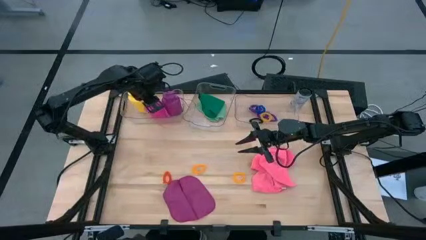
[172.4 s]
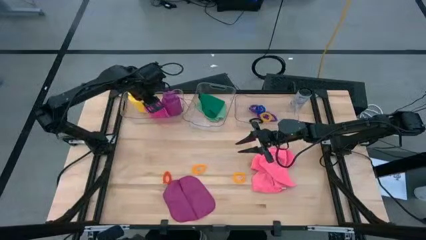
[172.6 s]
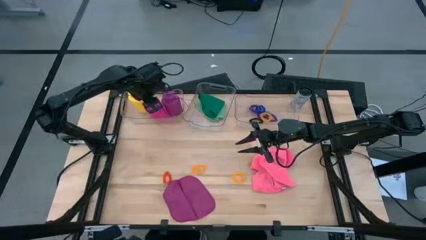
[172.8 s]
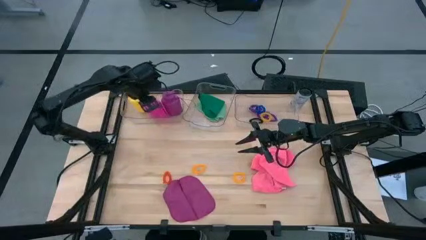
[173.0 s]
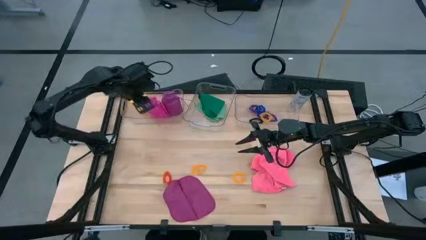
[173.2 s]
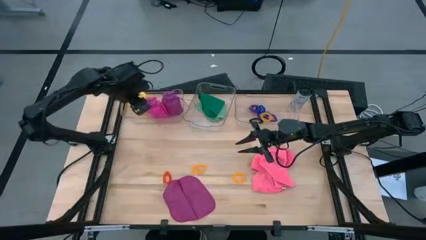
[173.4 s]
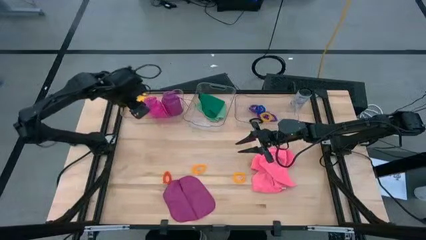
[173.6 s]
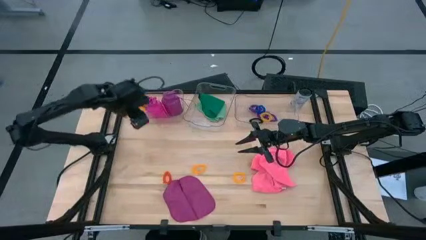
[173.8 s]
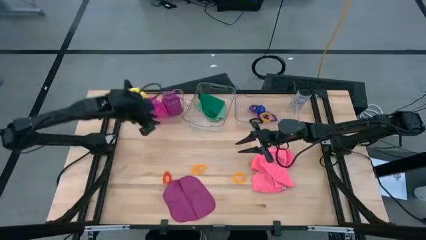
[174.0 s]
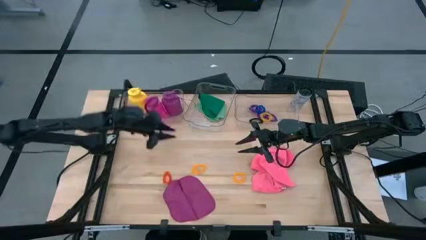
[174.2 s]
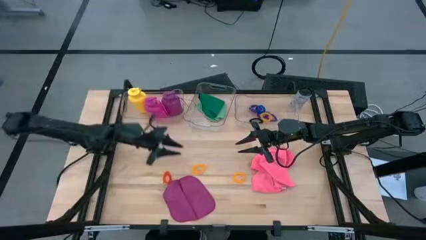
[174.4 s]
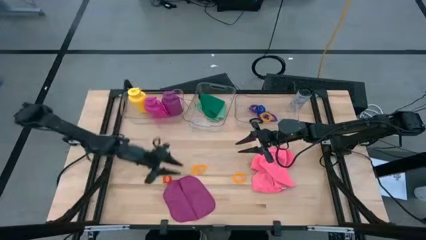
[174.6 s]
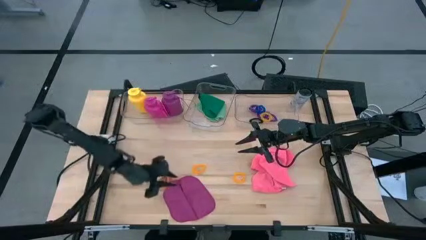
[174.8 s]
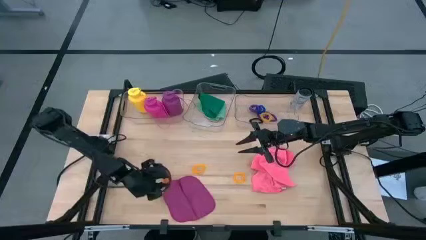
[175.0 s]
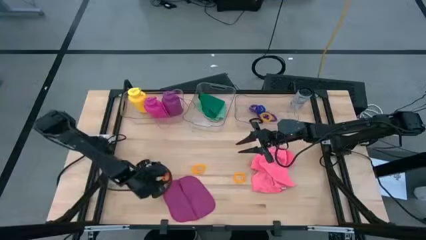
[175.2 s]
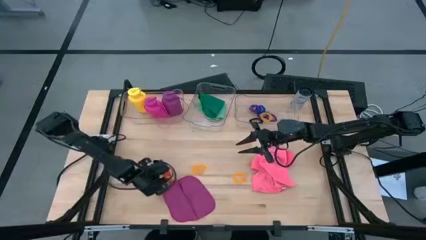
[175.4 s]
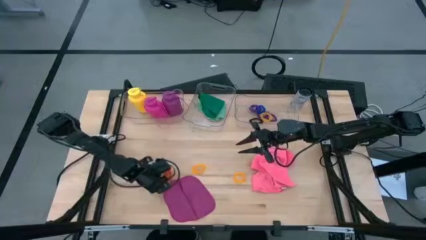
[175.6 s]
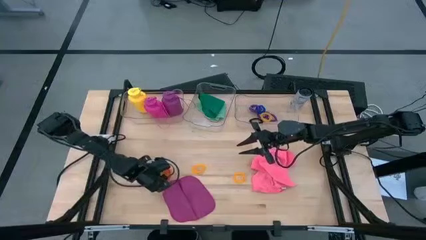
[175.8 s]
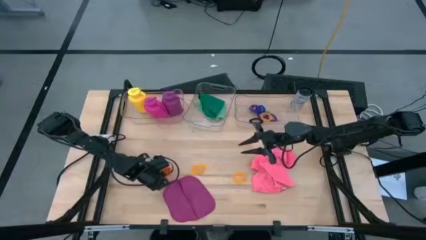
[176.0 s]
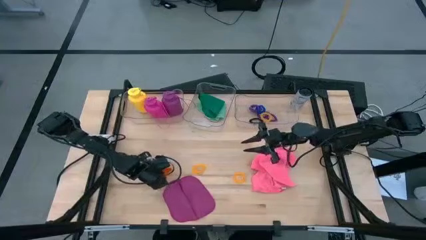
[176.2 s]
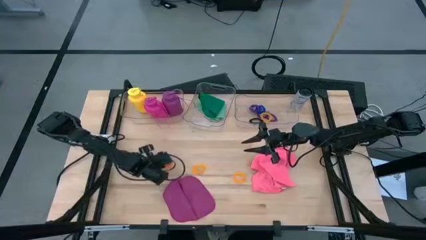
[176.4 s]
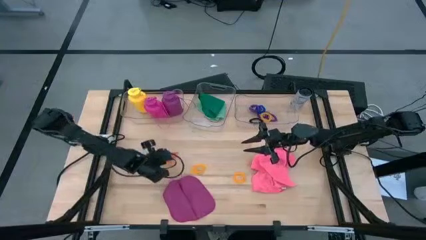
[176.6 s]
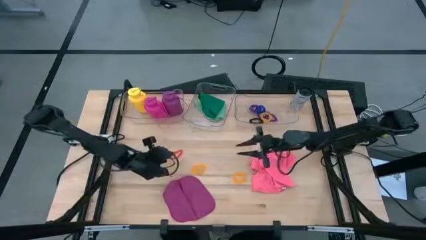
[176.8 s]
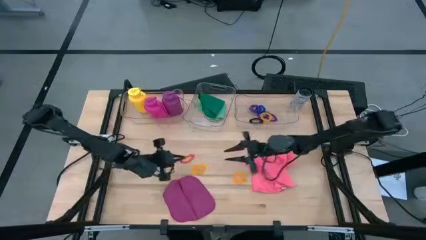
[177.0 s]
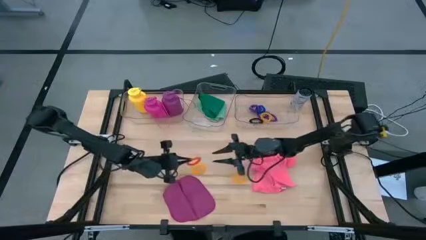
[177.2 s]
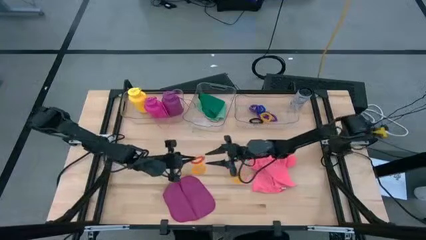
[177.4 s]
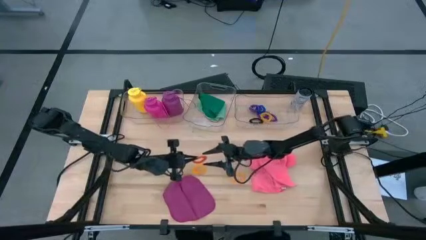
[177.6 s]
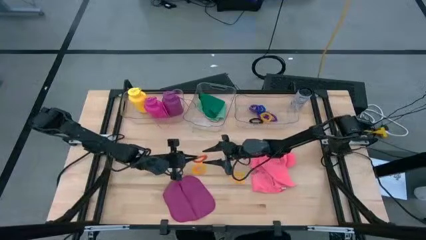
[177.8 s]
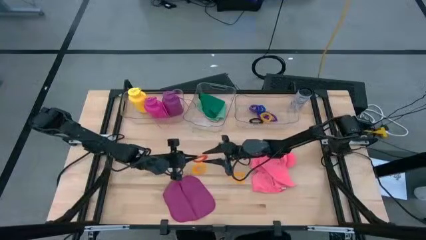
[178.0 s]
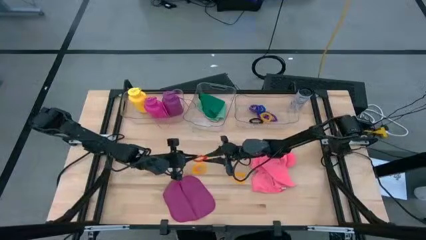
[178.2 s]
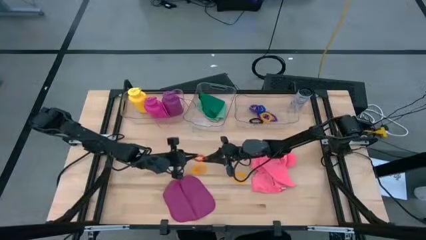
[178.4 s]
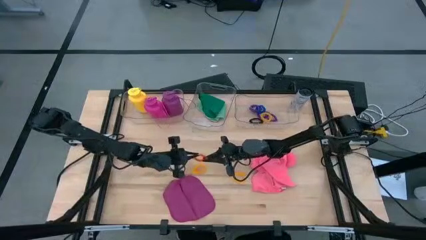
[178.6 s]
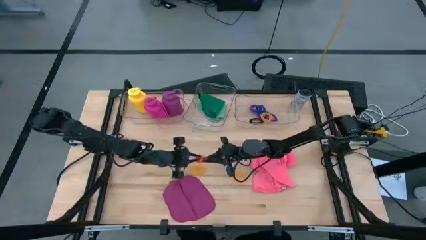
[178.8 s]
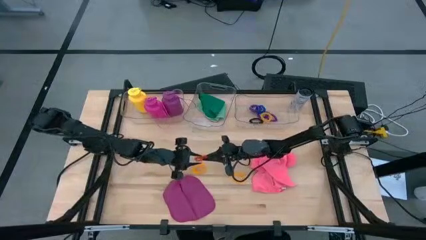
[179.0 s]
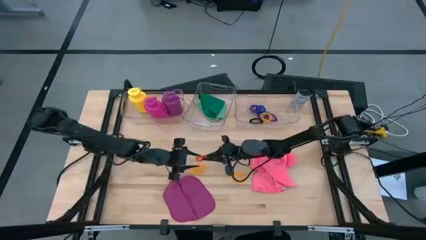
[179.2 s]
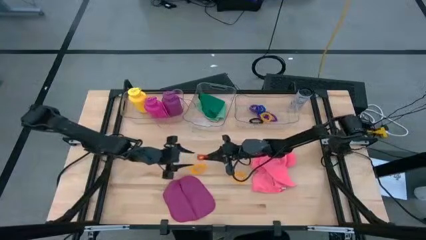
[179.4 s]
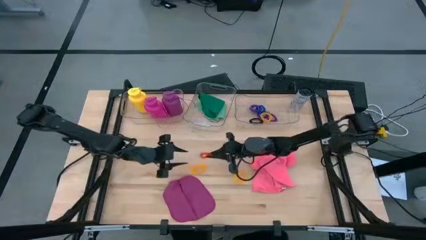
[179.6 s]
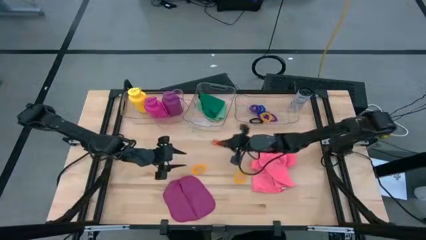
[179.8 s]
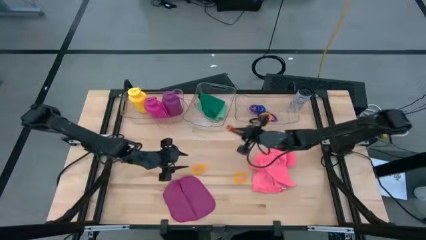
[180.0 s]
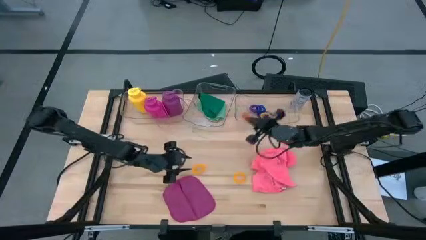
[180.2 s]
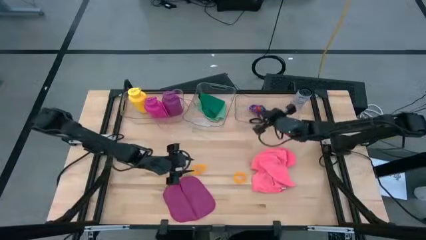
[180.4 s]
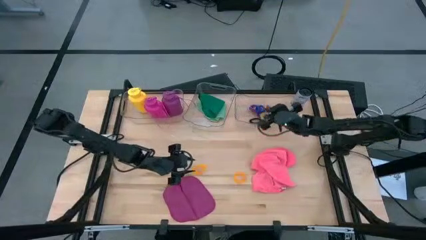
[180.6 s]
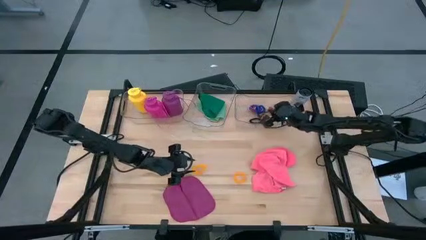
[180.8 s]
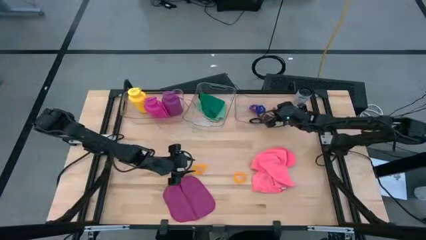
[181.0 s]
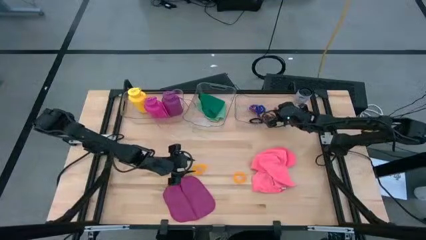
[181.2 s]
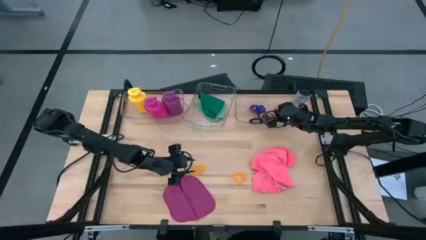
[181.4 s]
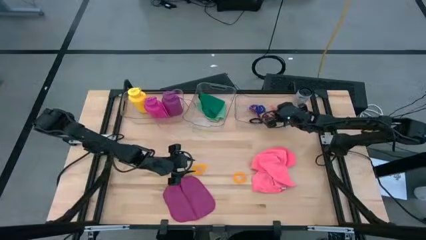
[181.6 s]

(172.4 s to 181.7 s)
Task: Pick & Place Sports Items
Put the orange spring keychain into the right transparent bin

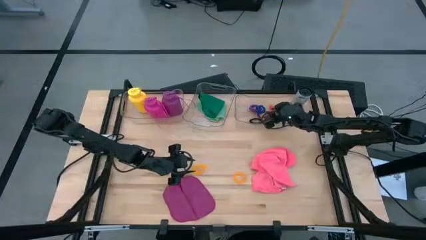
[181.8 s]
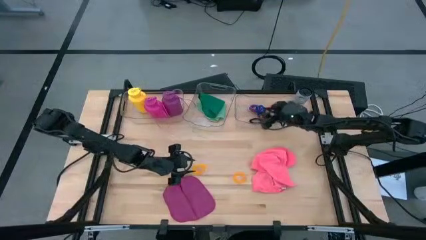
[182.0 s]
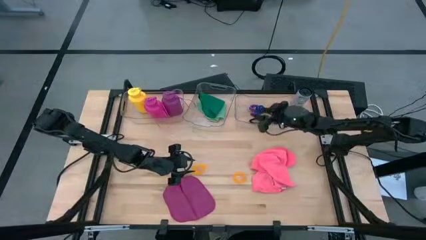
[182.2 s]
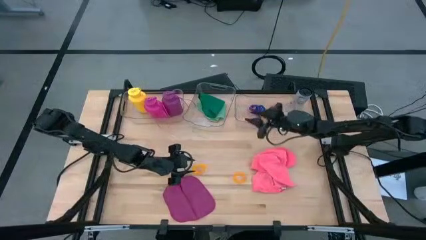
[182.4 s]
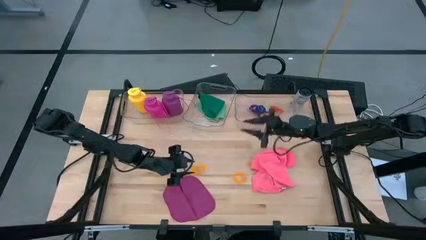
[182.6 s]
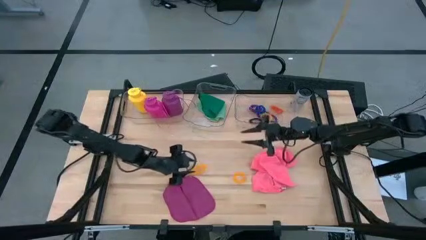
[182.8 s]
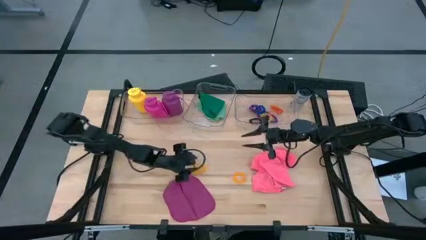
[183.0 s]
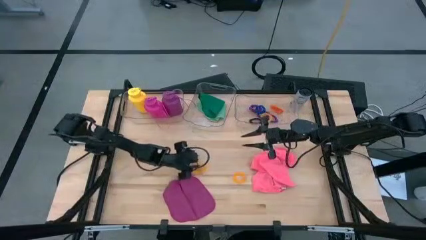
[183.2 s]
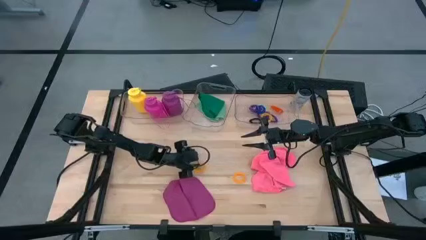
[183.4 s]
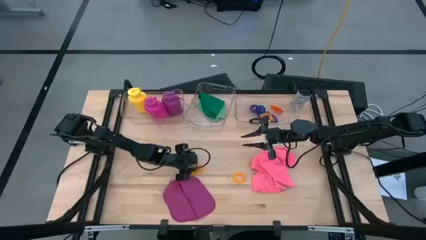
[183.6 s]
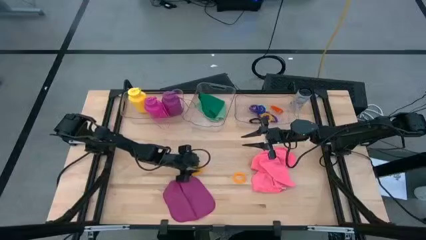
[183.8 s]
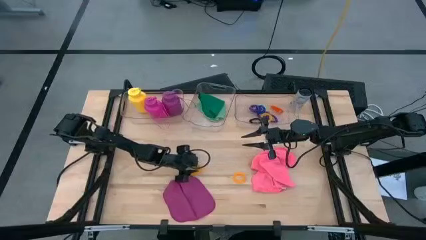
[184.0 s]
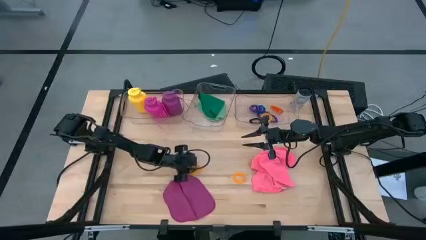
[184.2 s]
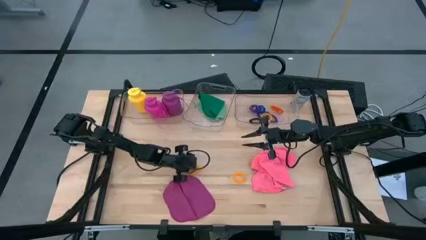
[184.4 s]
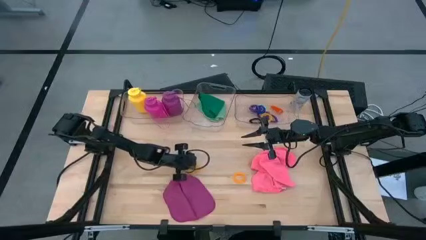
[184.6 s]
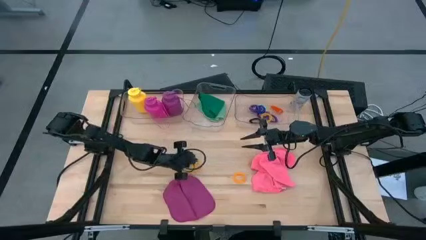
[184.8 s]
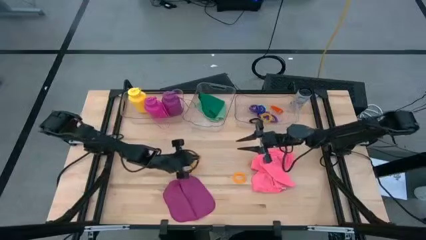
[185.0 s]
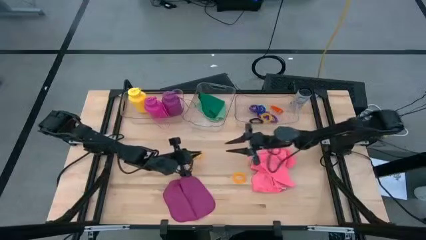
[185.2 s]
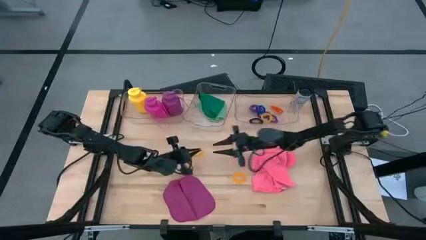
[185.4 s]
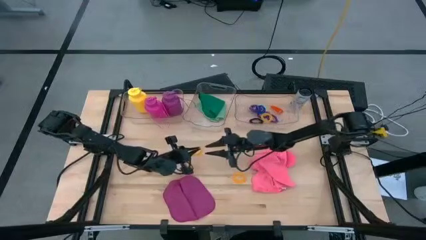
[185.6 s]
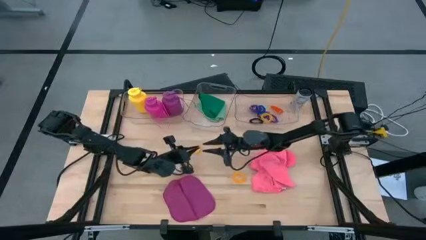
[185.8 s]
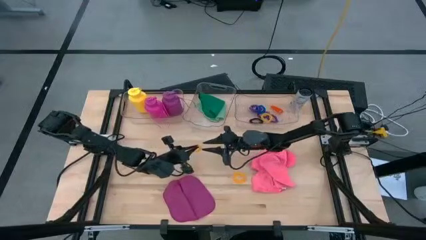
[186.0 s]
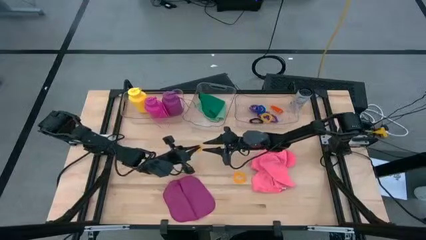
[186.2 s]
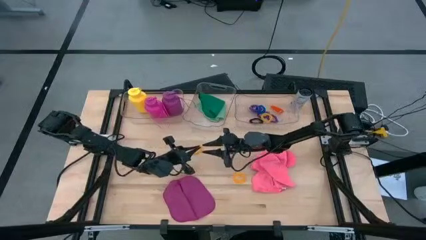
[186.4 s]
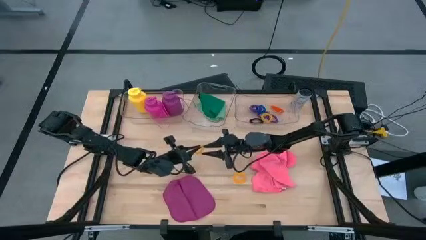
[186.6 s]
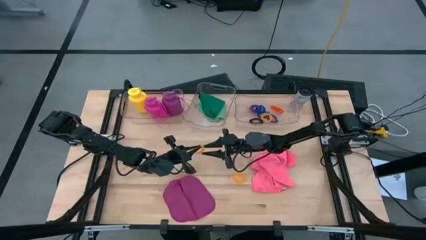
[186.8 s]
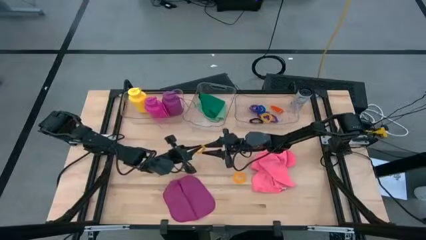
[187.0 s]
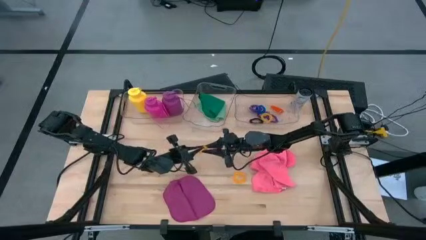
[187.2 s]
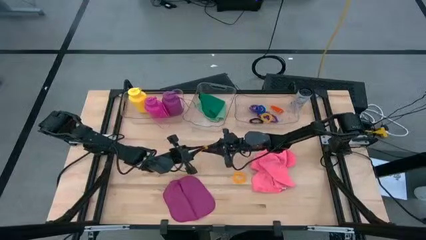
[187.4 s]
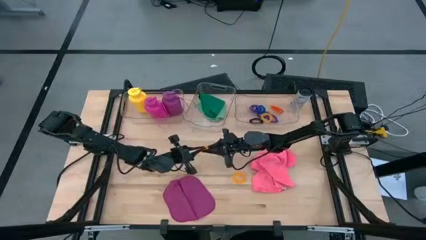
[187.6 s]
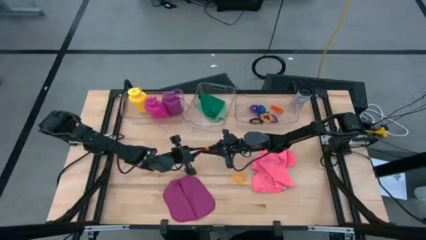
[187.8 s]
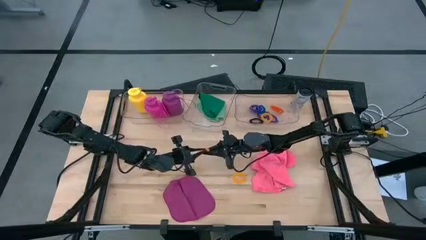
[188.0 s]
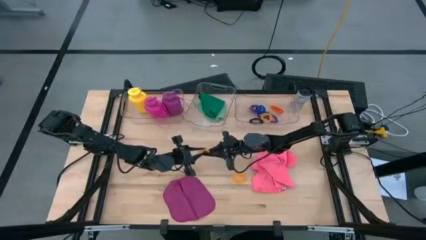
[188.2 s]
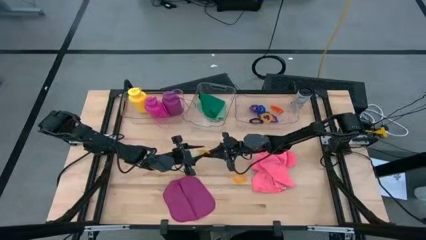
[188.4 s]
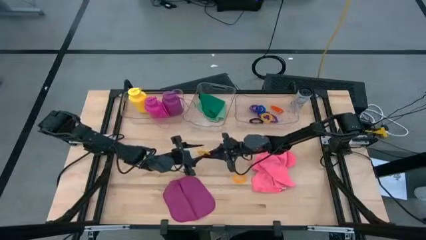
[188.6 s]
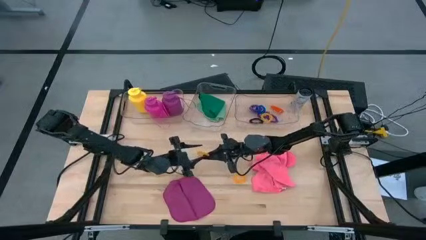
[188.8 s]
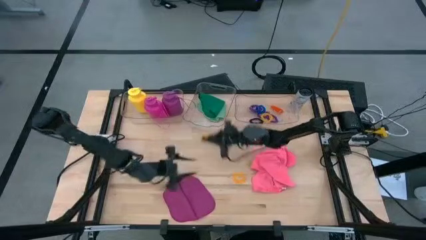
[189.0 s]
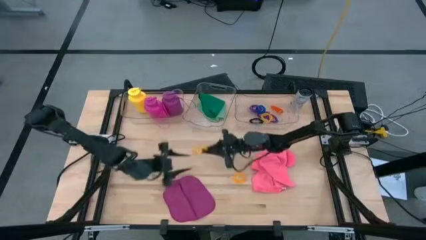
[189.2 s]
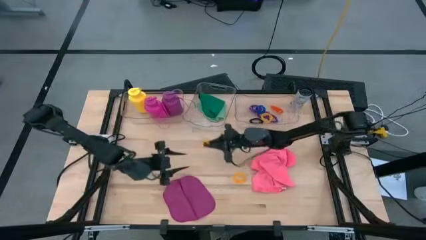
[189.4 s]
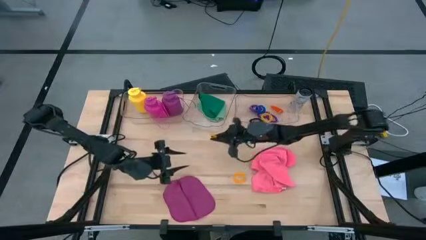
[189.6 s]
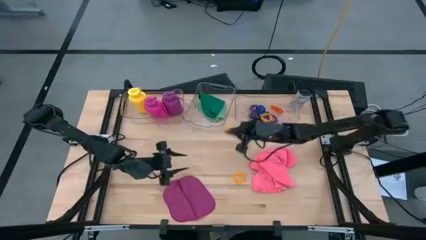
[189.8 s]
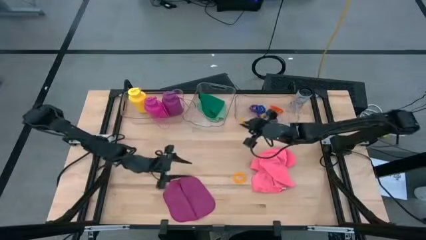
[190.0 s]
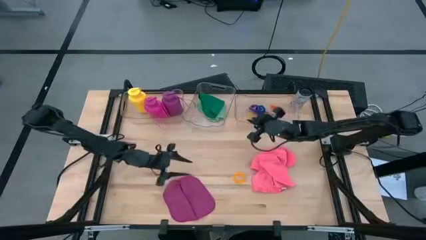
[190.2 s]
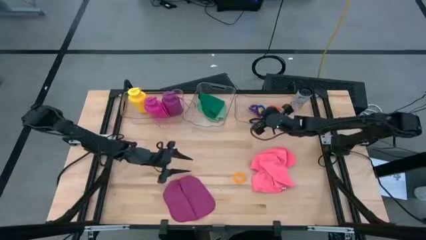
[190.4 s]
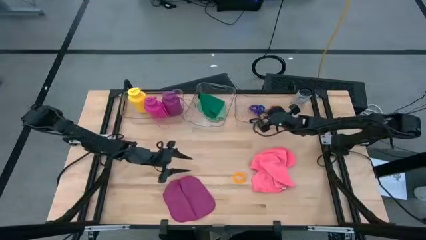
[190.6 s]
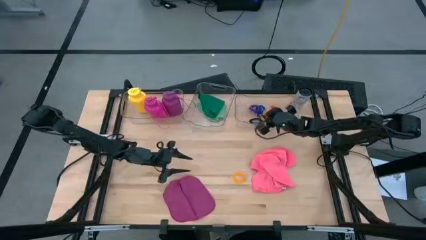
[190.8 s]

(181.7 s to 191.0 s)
Put the left yellow spring keychain into the right transparent bin
